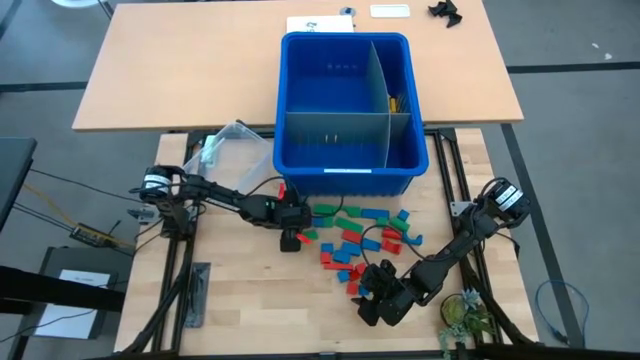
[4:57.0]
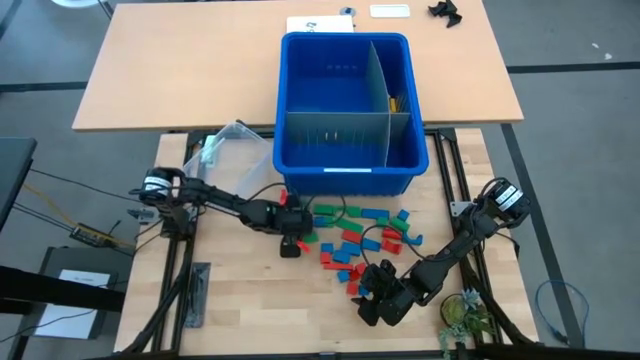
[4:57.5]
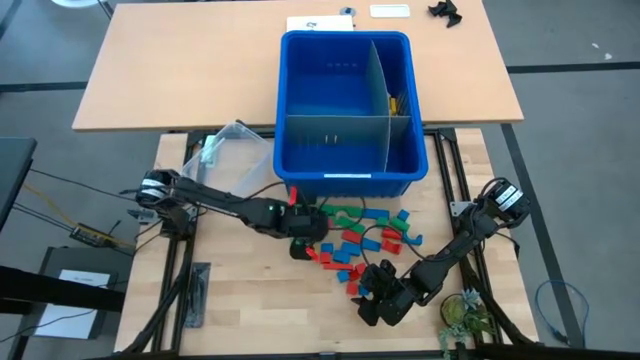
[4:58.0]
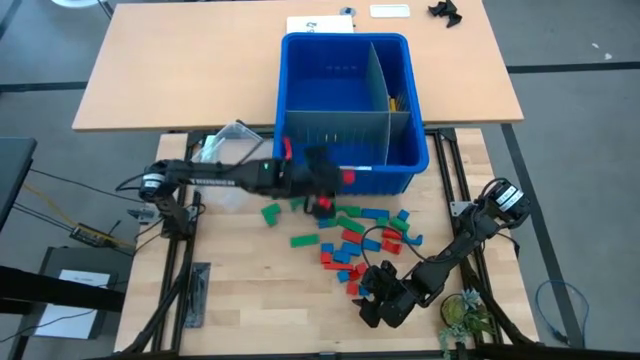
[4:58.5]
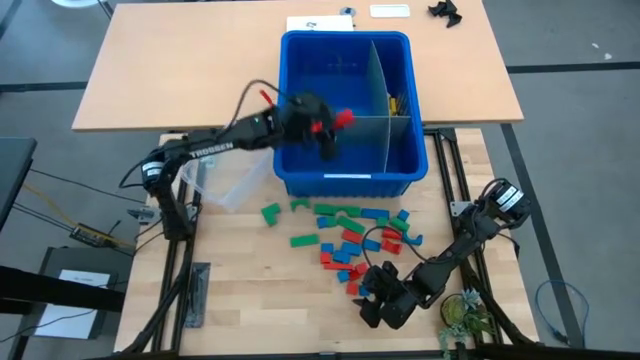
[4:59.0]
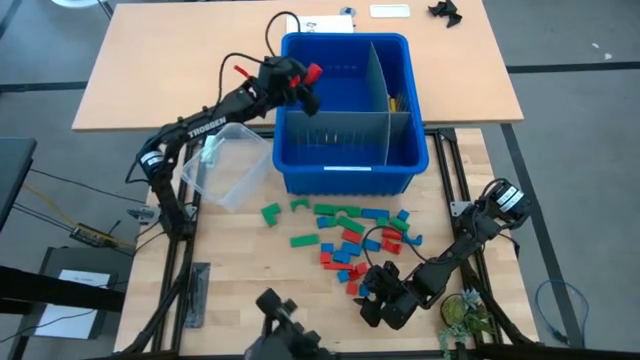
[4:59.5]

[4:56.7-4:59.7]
Task: Sort blocks
Put the red block into the blue bin

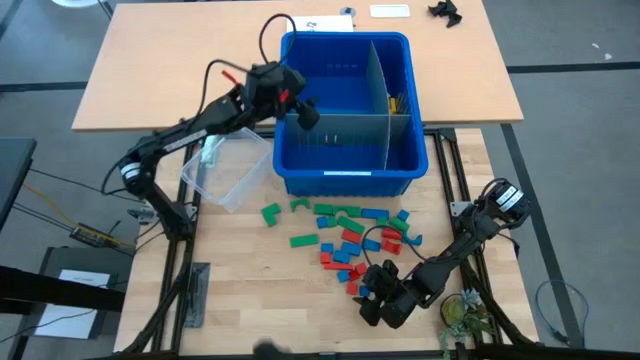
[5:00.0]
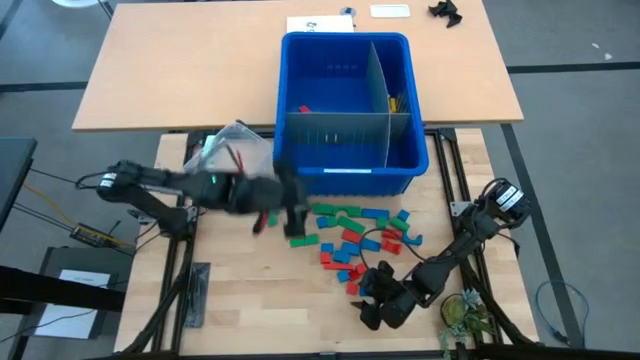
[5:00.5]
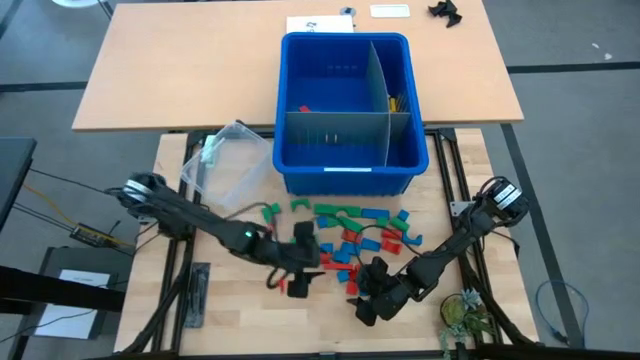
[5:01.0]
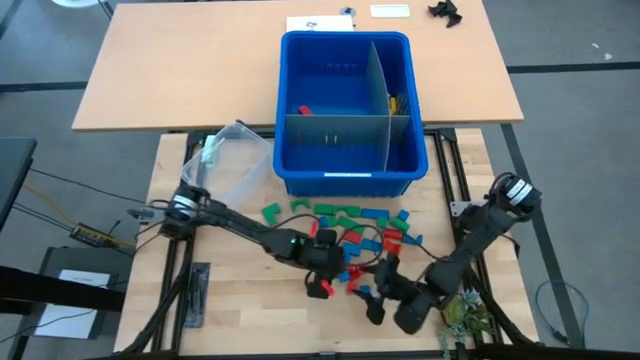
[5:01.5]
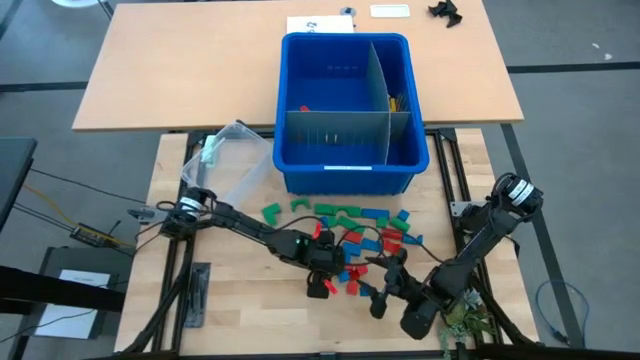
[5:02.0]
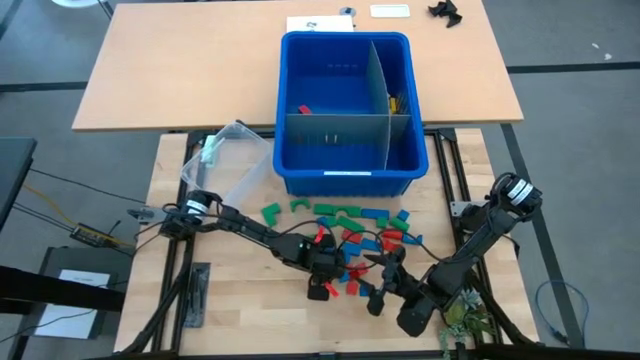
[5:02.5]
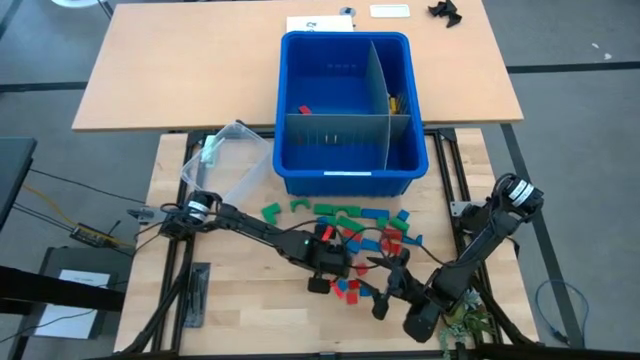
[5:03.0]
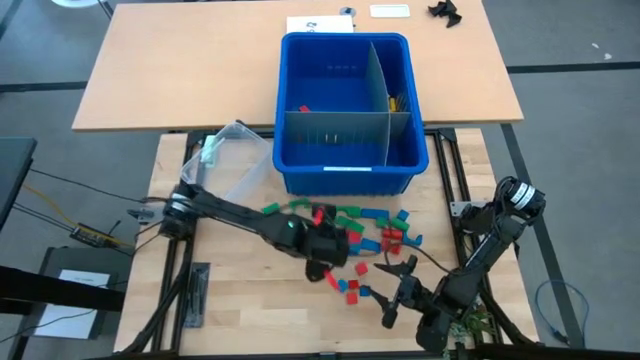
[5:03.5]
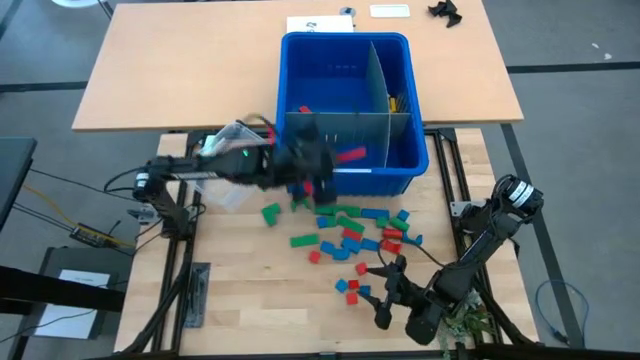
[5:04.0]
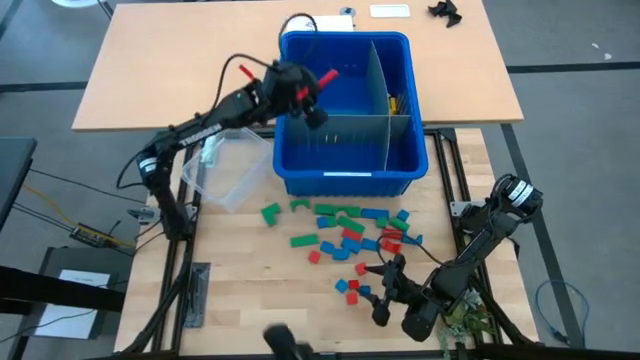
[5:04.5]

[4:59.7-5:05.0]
Put the red block into the blue bin

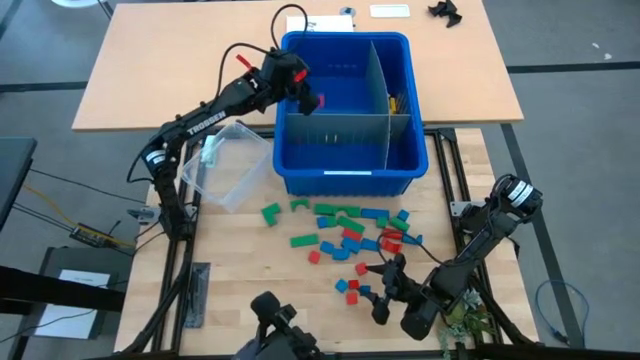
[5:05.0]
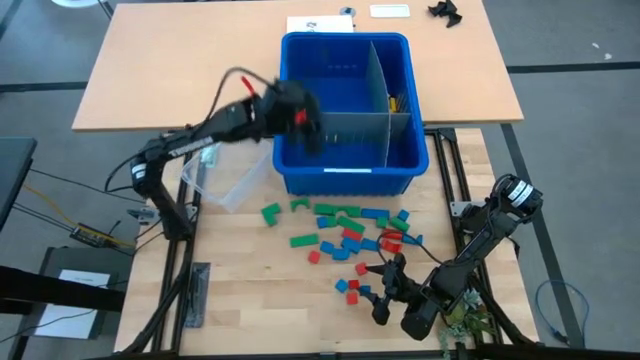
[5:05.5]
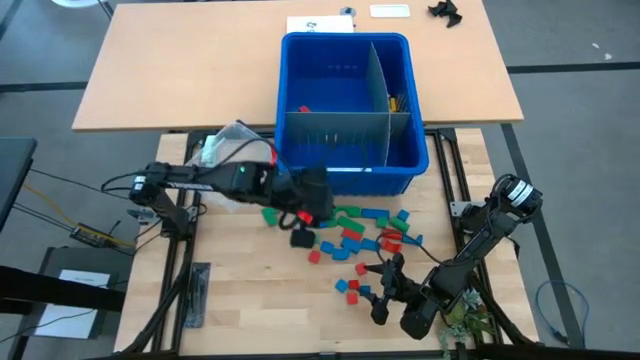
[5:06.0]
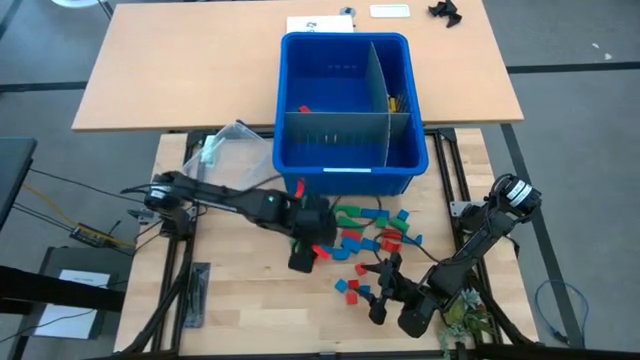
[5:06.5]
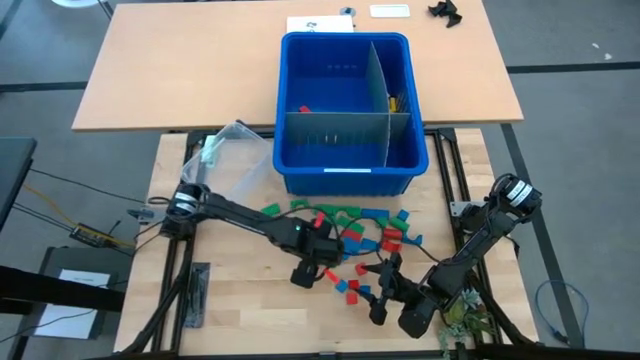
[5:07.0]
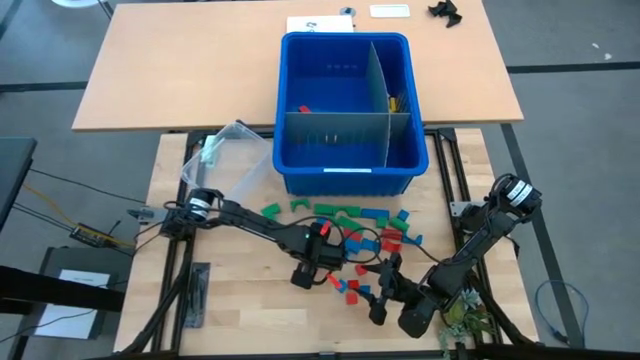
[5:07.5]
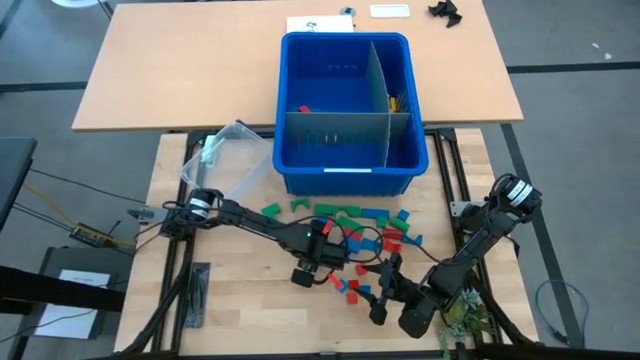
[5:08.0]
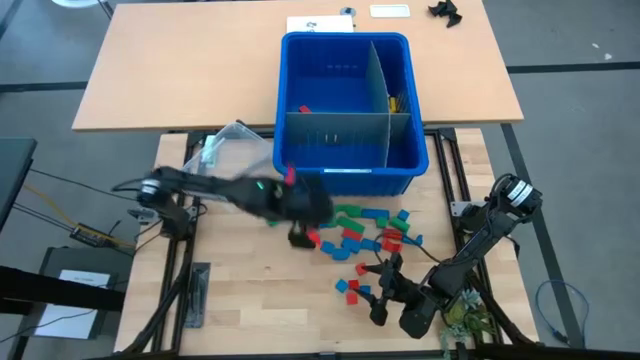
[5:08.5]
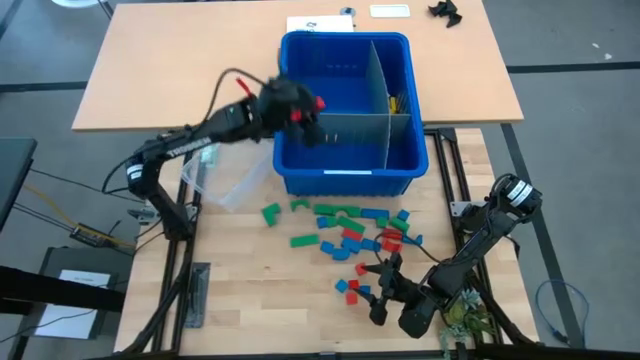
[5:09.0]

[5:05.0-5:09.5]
Put the red block into the blue bin

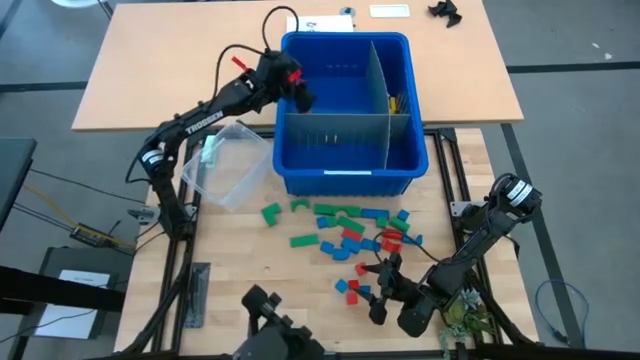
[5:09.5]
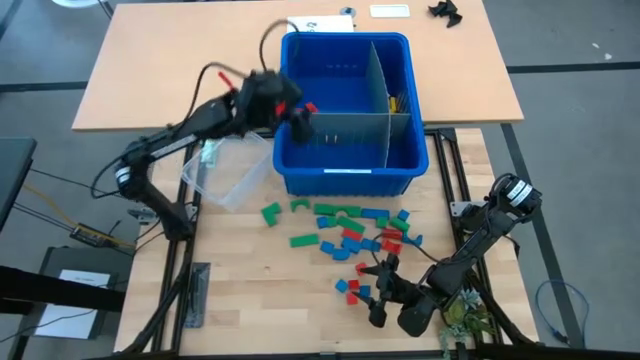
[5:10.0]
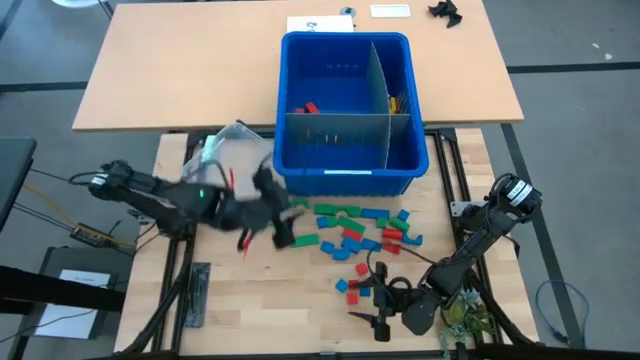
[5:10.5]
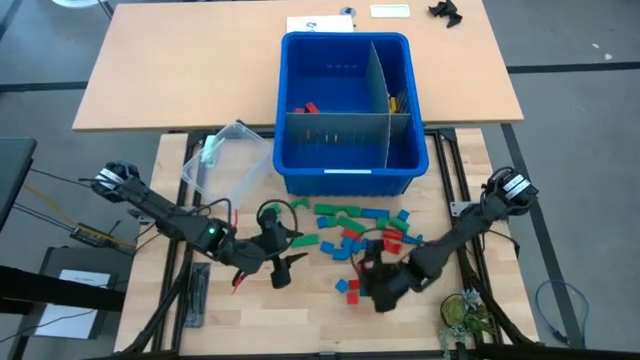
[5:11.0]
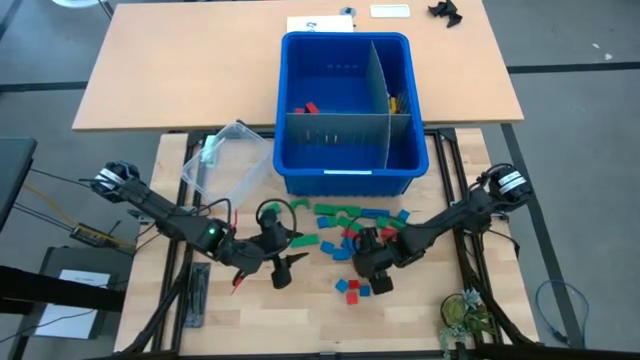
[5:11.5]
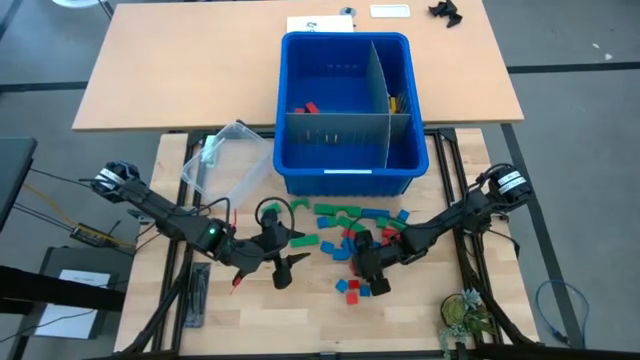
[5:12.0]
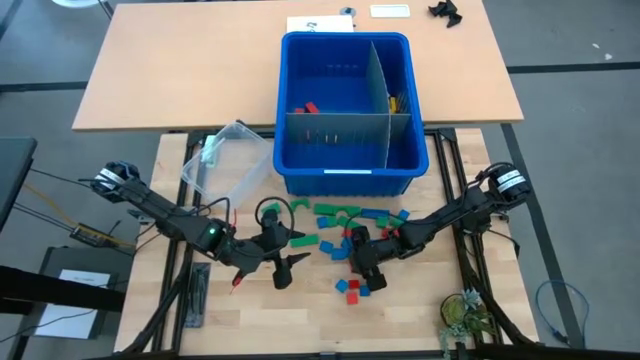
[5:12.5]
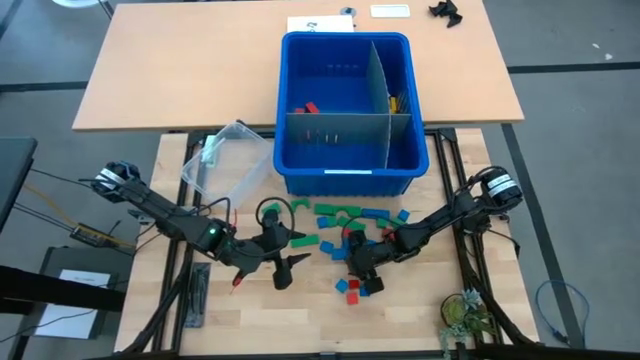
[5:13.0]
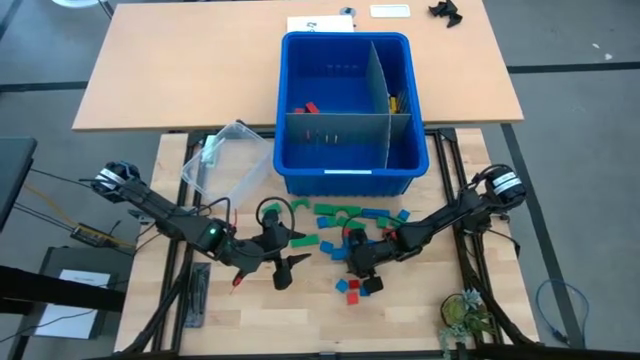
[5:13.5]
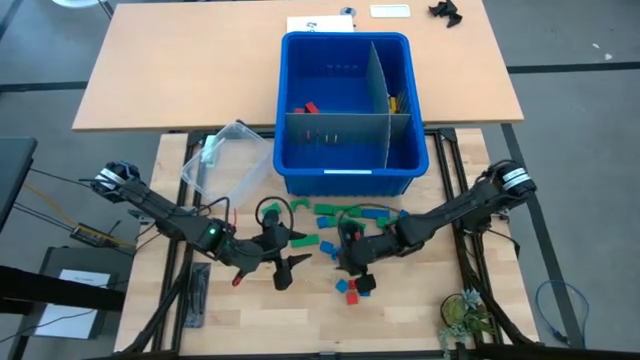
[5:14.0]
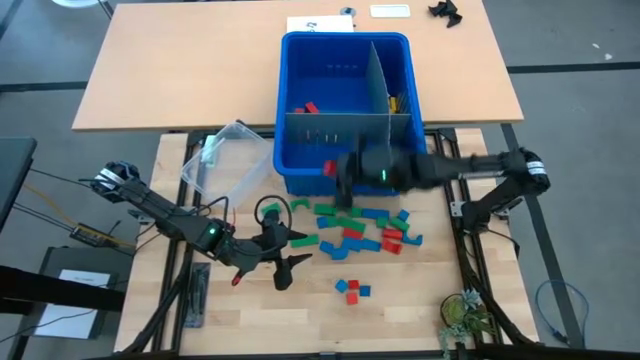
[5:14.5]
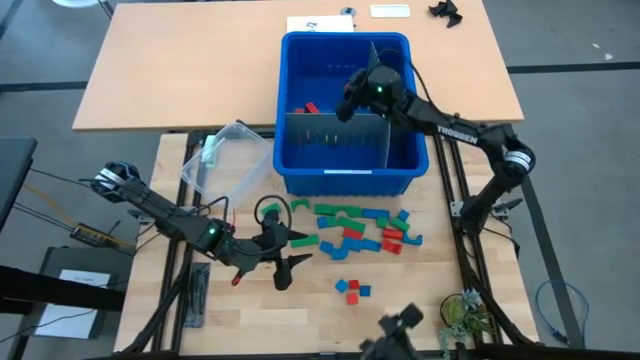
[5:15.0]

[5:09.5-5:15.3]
Put the red block into the blue bin

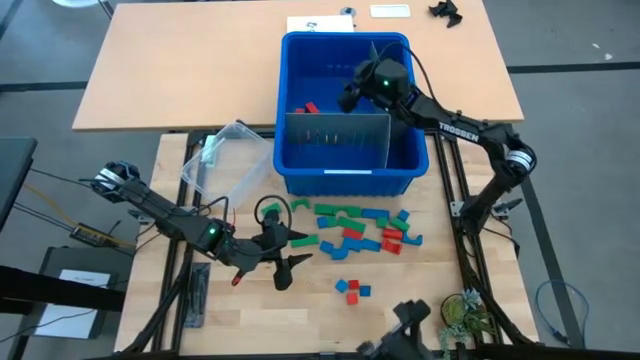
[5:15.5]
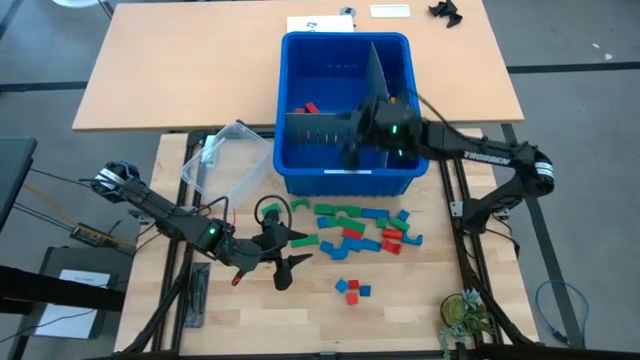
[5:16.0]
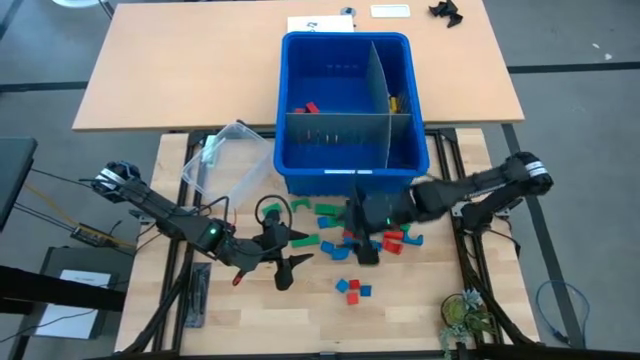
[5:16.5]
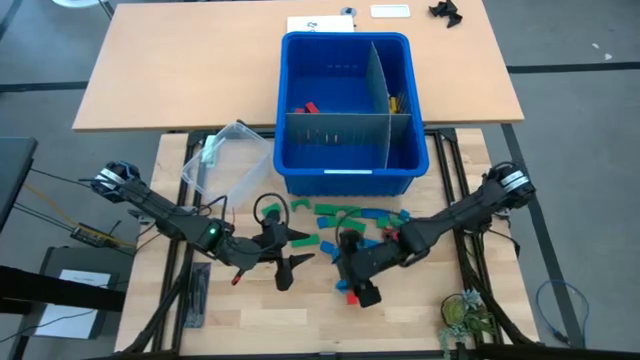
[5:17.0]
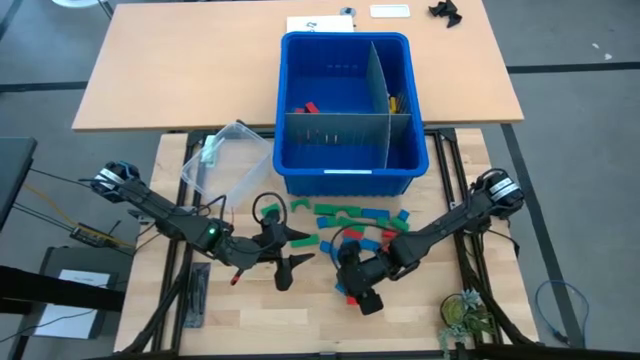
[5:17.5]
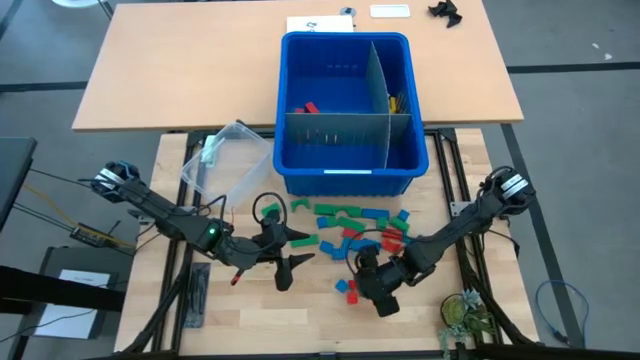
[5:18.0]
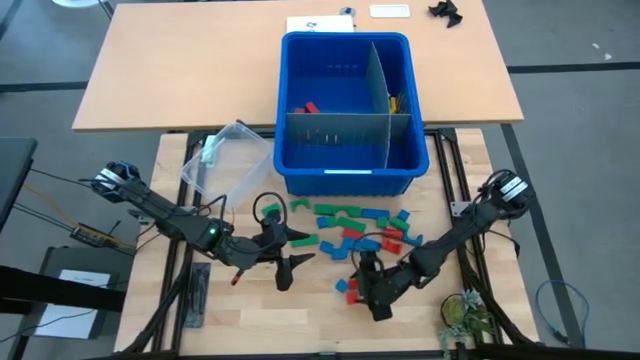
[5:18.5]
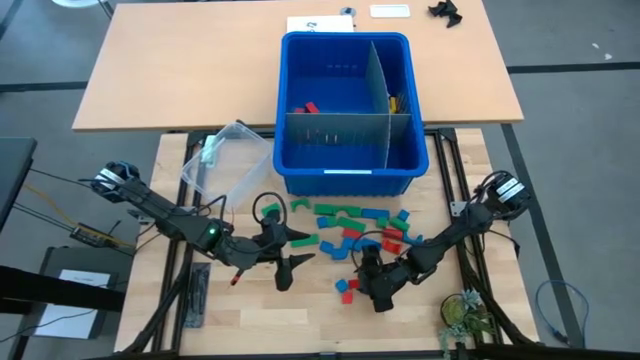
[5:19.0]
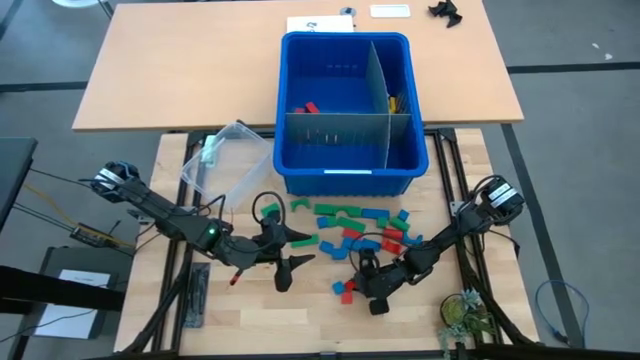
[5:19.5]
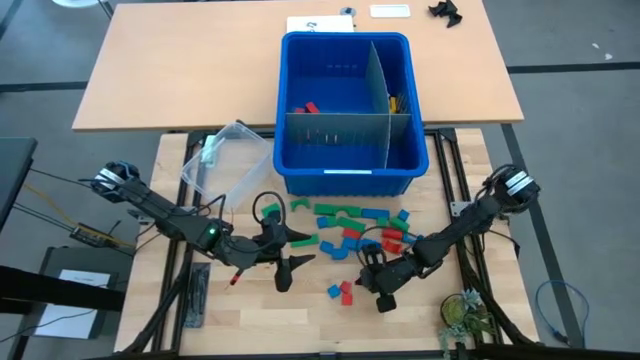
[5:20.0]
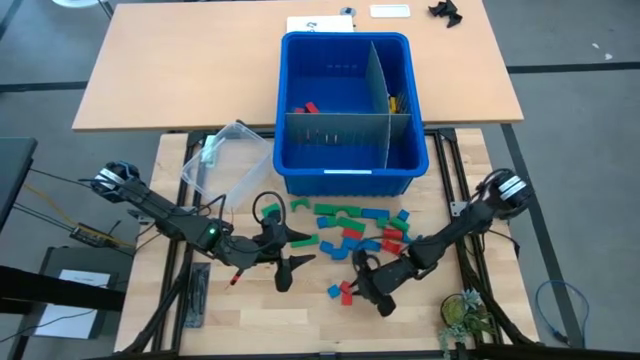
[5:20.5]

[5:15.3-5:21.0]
Put the red block into the blue bin
